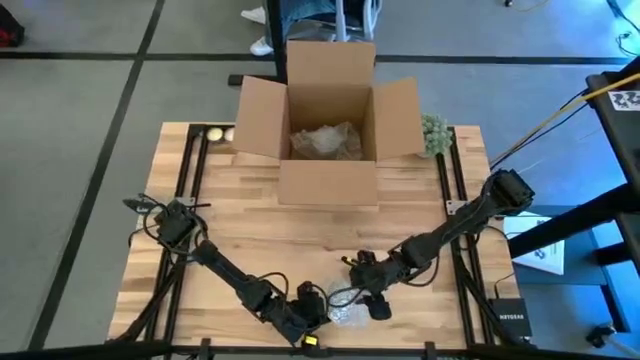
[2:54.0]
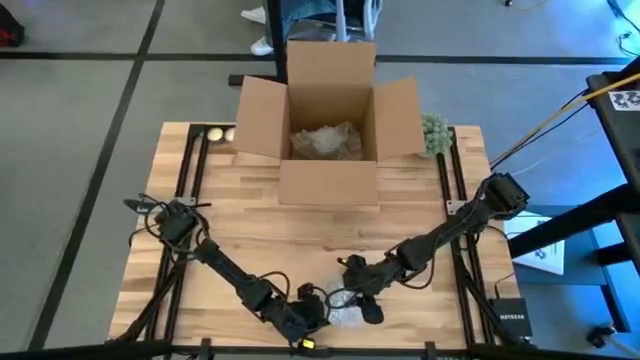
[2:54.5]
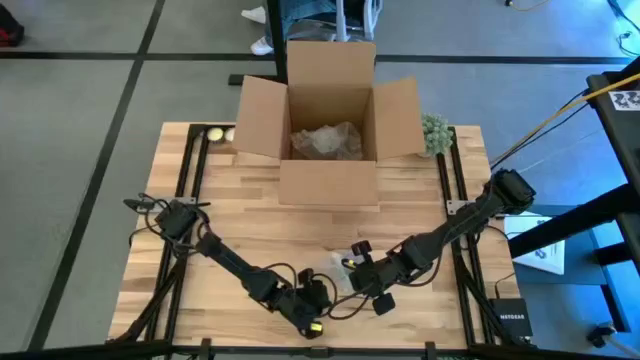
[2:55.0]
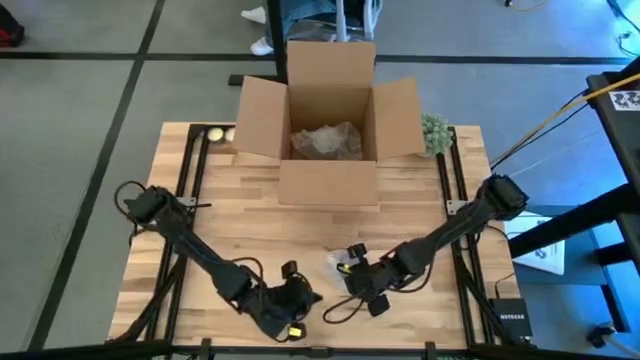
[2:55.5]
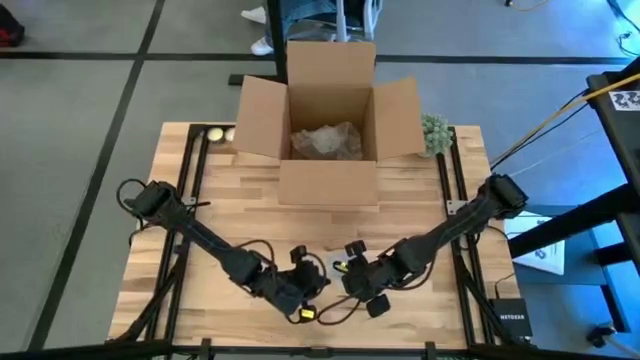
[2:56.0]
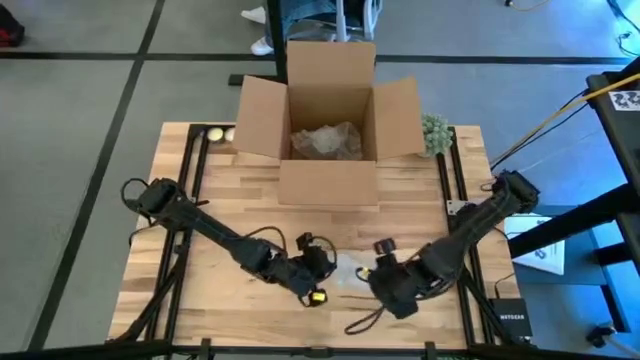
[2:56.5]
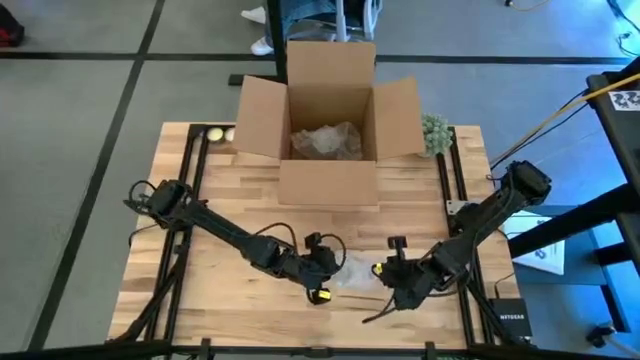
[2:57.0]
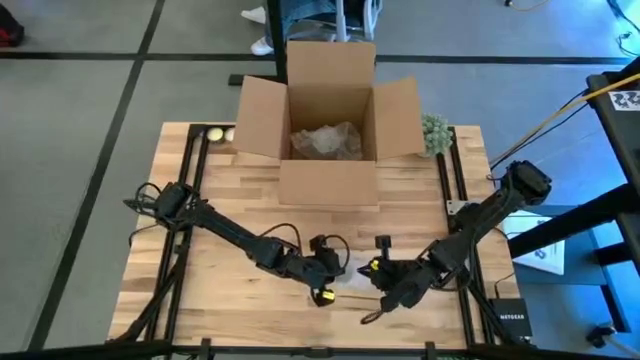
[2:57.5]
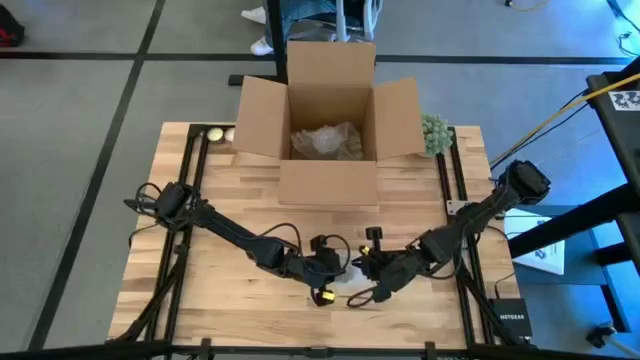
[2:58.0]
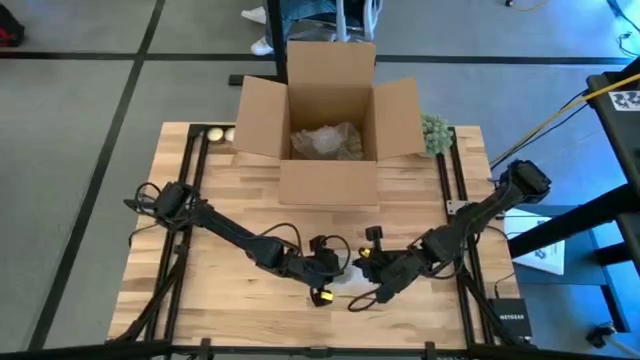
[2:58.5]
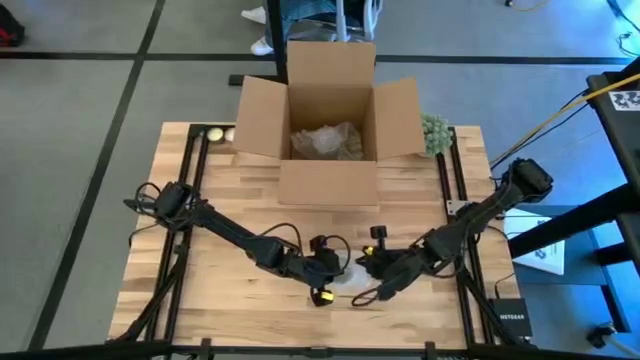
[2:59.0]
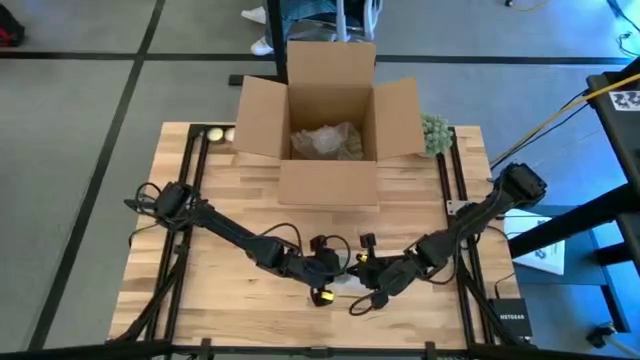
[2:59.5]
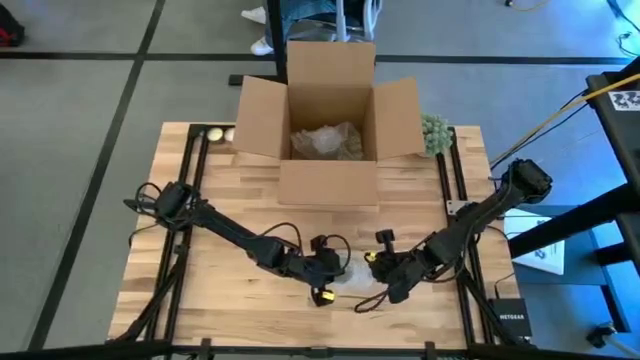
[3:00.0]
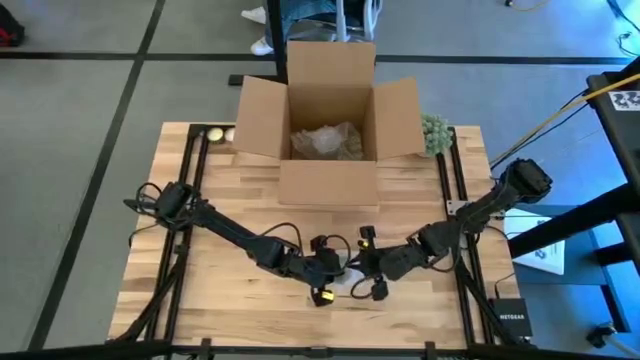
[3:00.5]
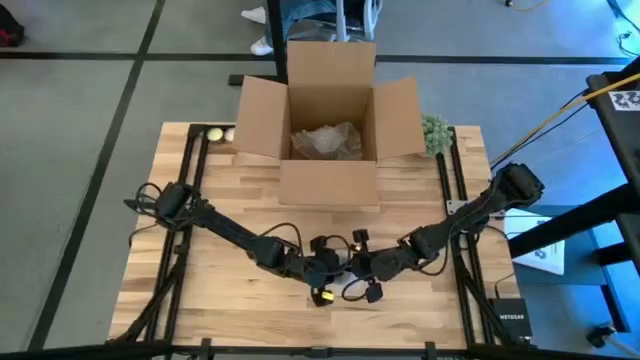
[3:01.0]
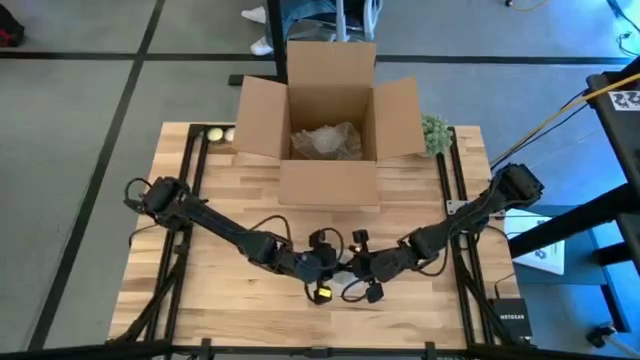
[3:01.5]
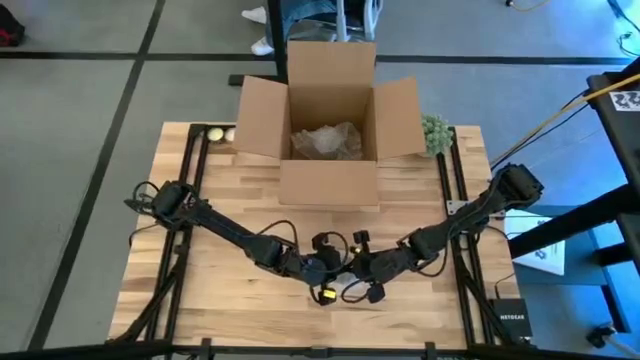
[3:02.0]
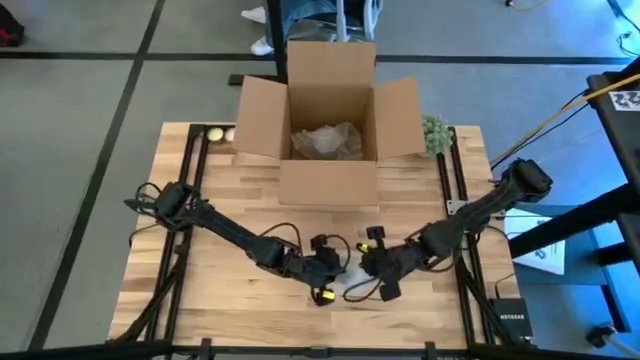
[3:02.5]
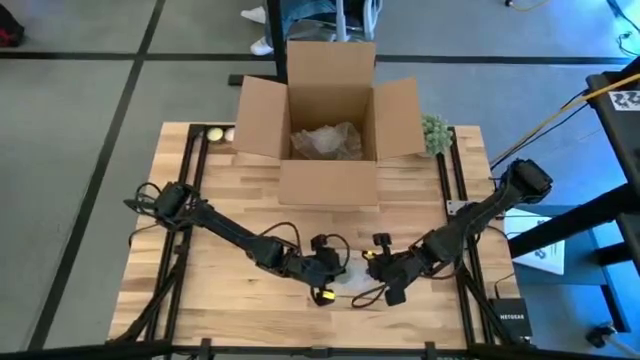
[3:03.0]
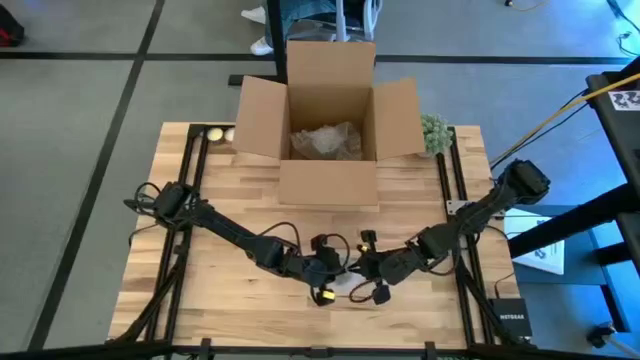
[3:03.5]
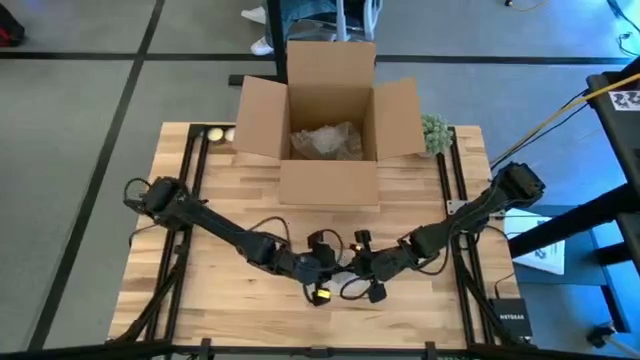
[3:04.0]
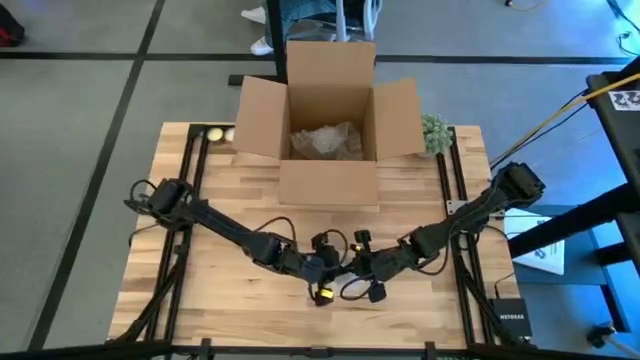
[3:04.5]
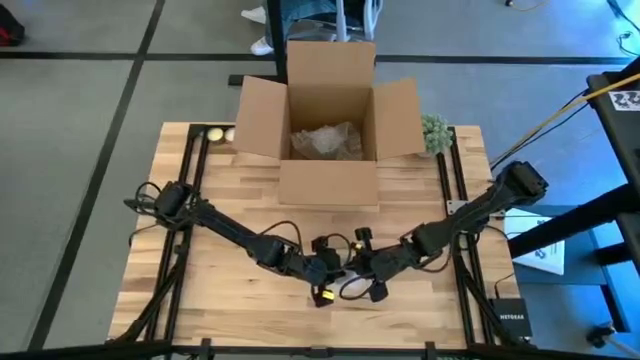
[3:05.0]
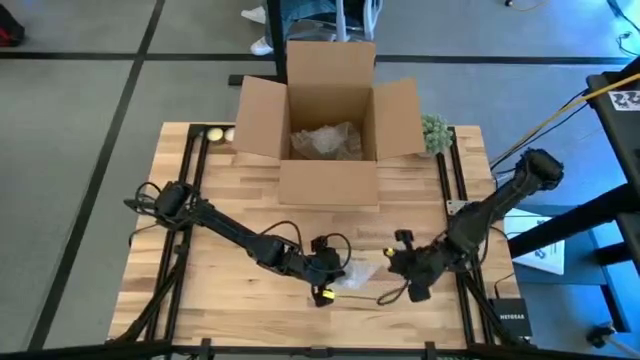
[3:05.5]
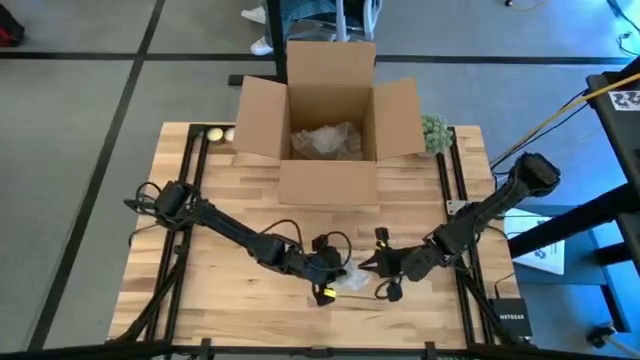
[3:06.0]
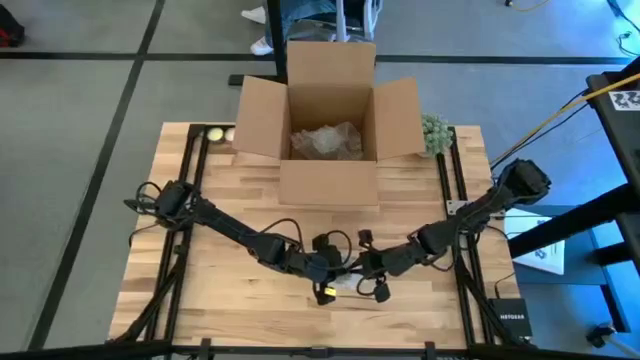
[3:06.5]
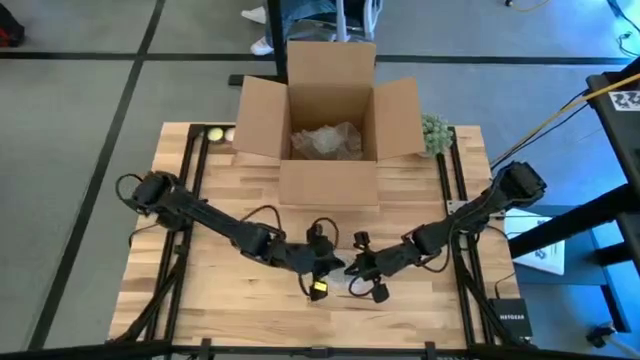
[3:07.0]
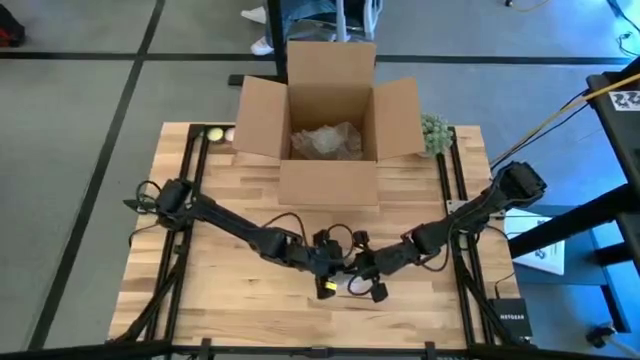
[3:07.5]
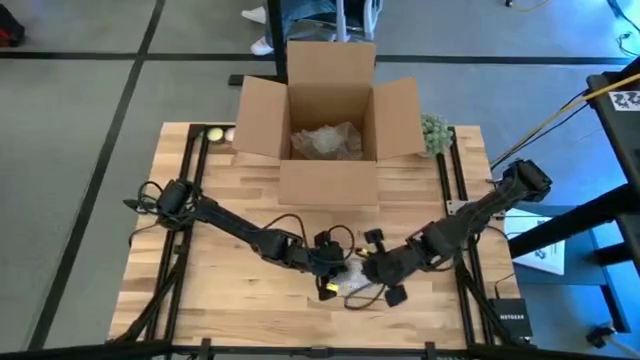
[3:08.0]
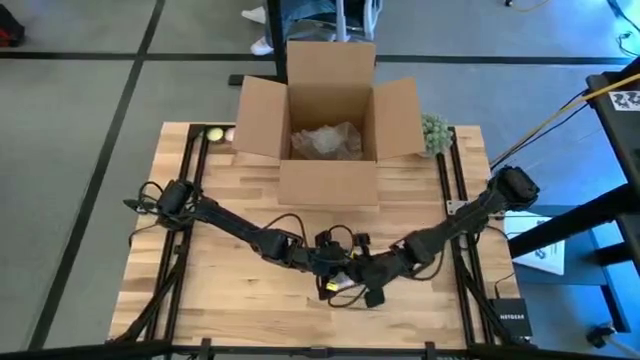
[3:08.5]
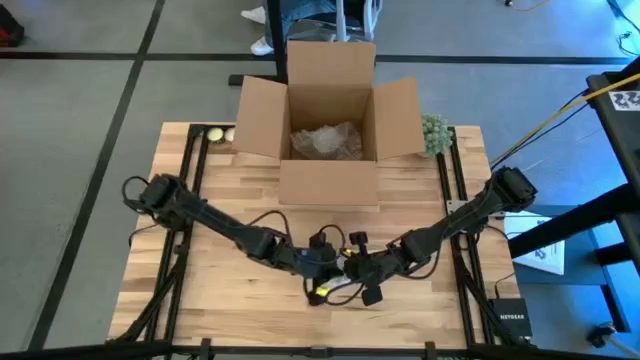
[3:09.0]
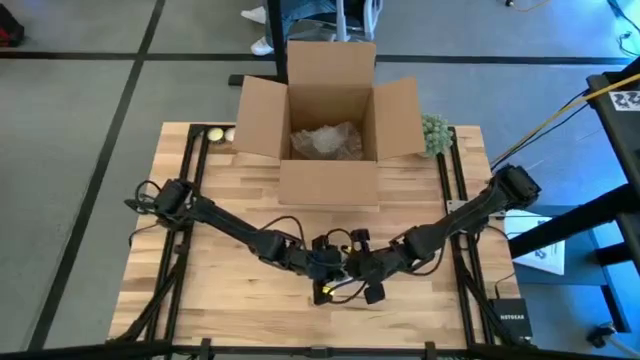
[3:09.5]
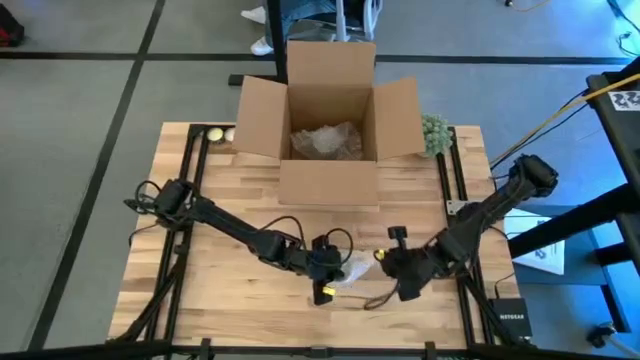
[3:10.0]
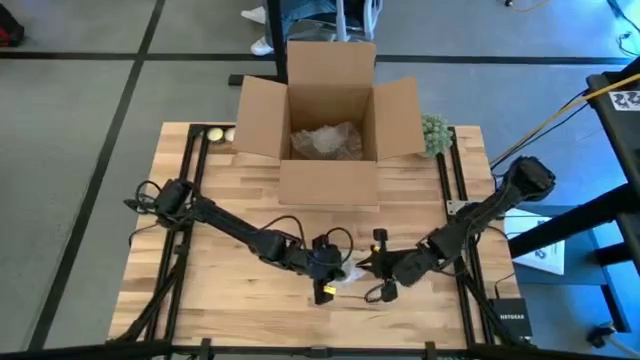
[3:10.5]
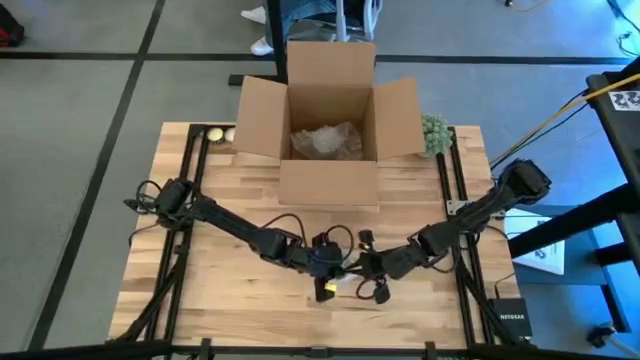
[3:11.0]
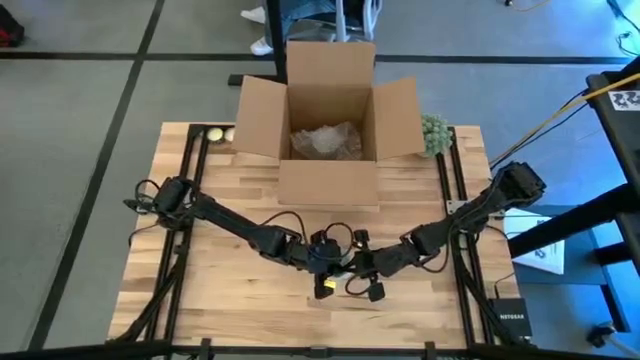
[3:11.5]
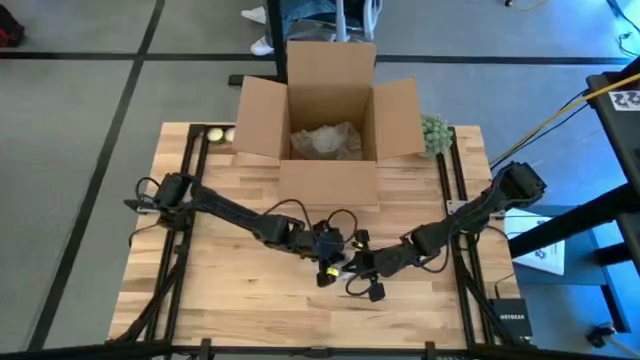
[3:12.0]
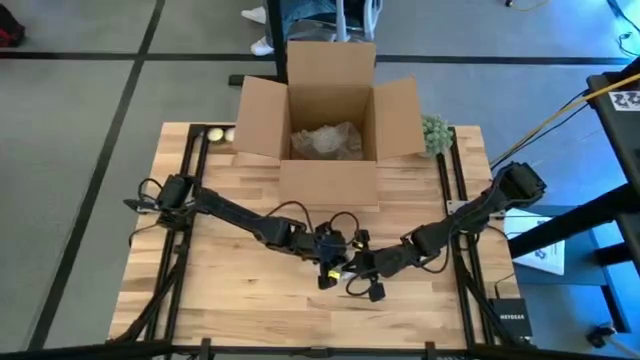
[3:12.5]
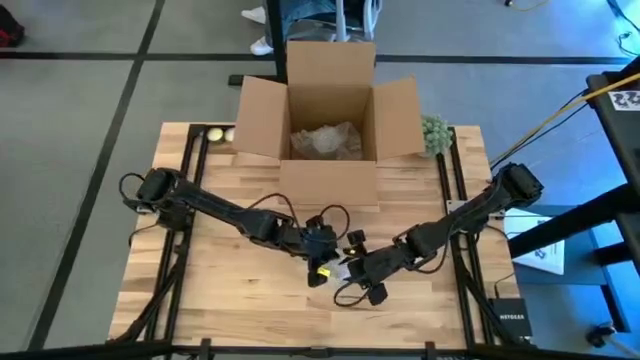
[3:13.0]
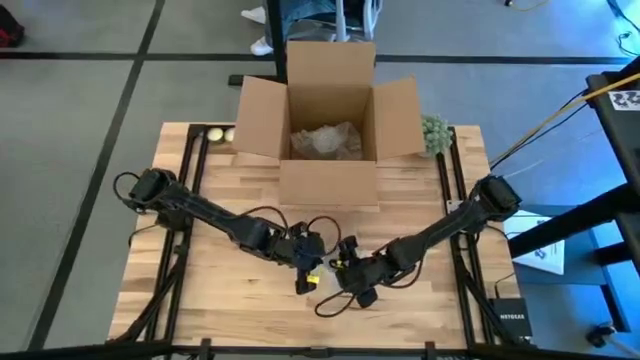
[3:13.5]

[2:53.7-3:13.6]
Task: wrap mug
Wrap the mug with the bubble wrap

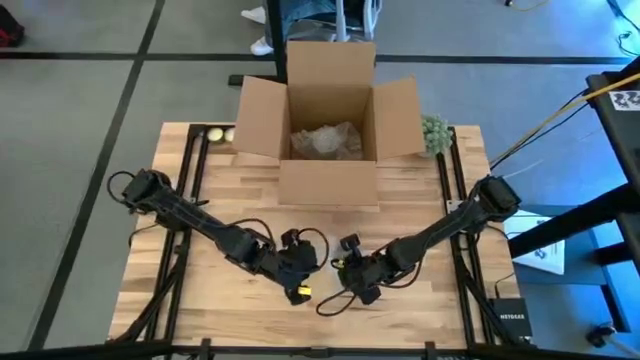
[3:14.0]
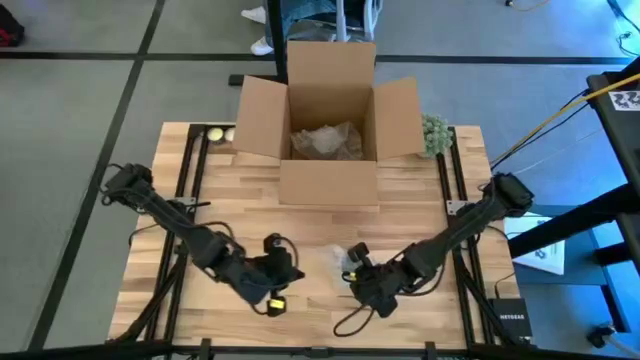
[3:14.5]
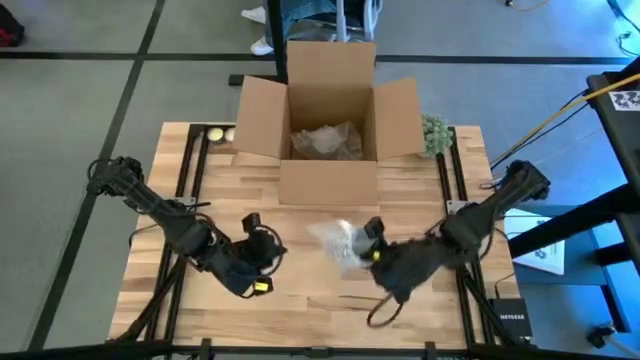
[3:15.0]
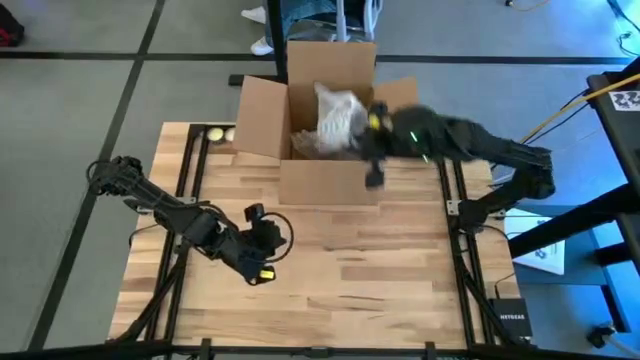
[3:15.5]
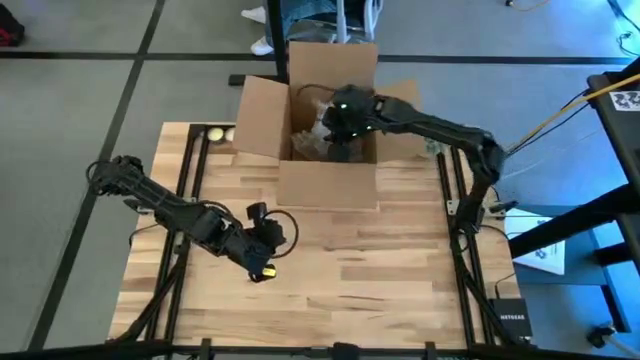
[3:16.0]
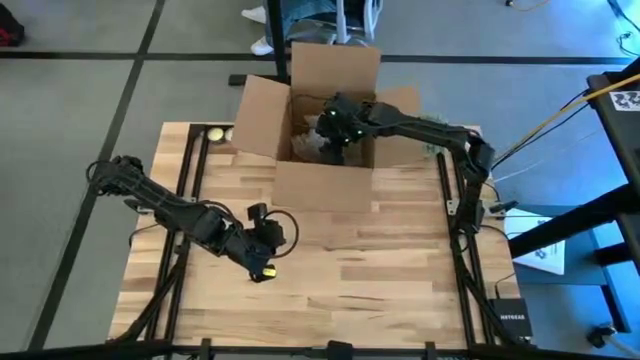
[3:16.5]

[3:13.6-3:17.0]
Put the mug into the box
